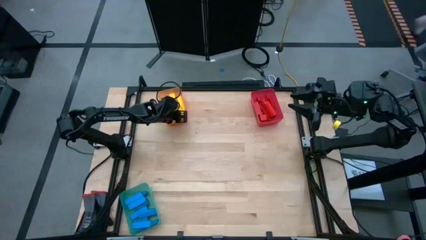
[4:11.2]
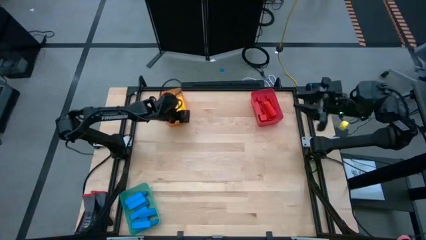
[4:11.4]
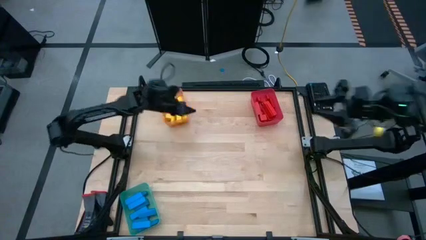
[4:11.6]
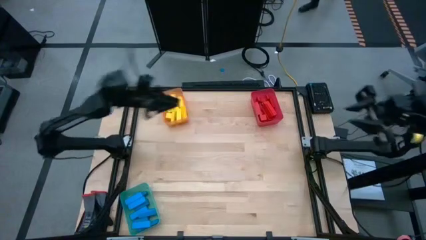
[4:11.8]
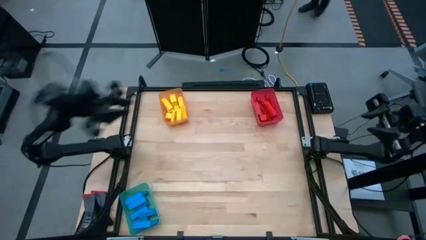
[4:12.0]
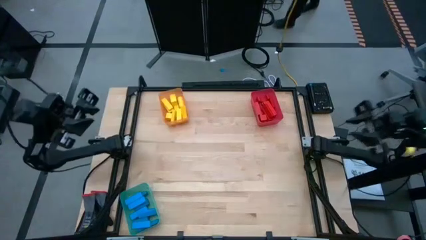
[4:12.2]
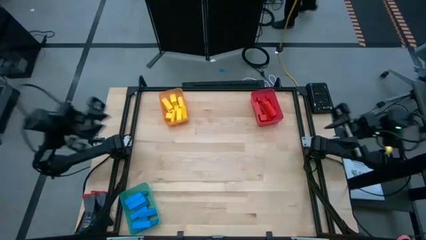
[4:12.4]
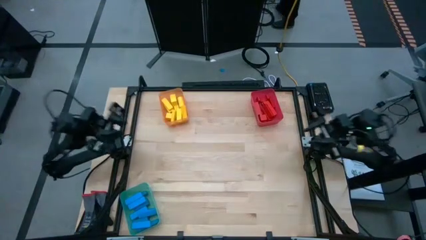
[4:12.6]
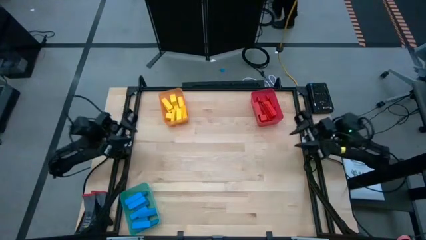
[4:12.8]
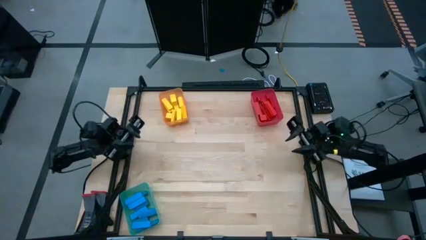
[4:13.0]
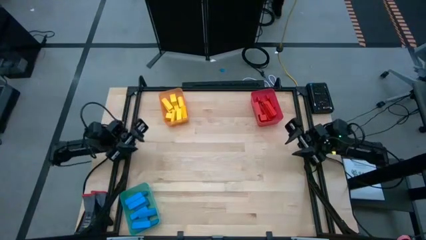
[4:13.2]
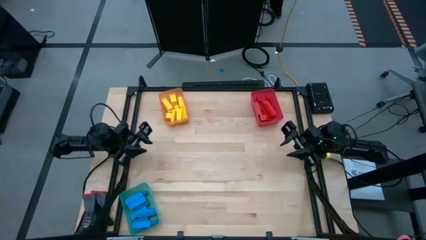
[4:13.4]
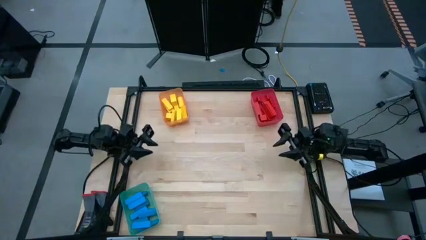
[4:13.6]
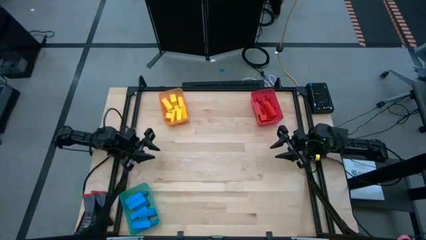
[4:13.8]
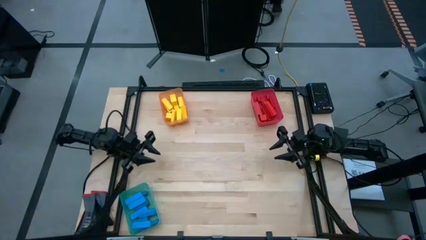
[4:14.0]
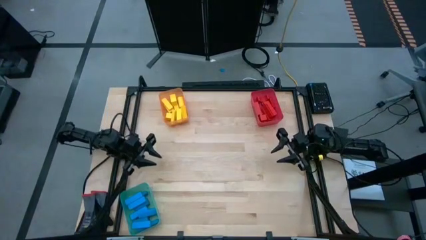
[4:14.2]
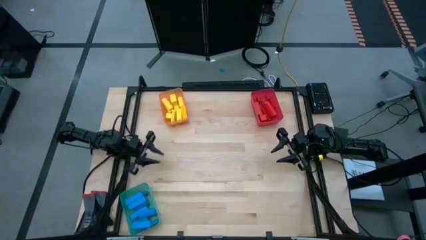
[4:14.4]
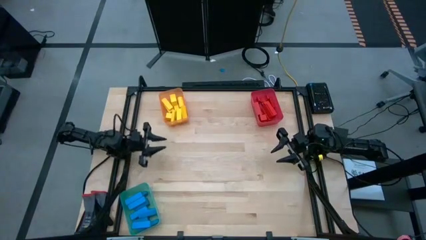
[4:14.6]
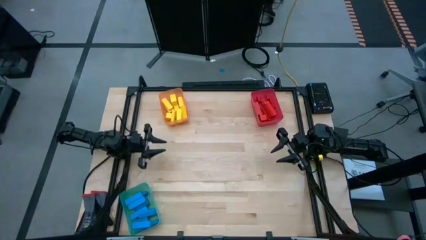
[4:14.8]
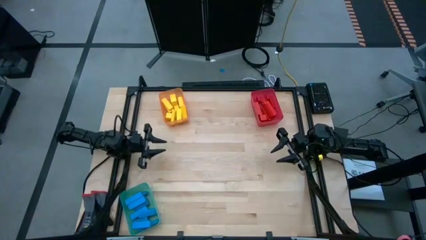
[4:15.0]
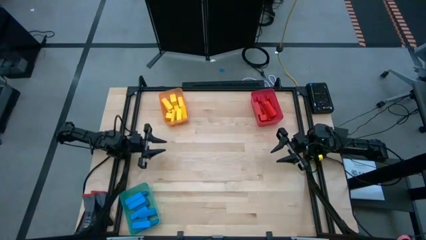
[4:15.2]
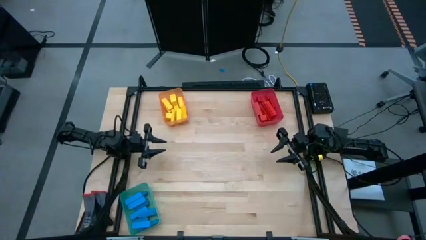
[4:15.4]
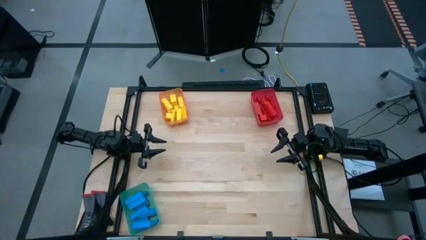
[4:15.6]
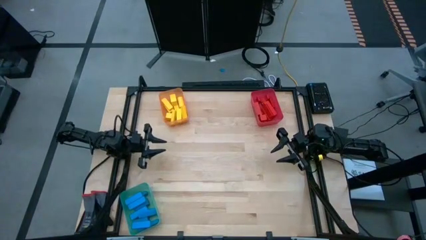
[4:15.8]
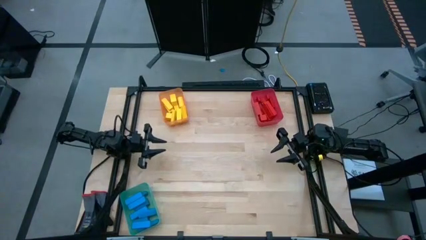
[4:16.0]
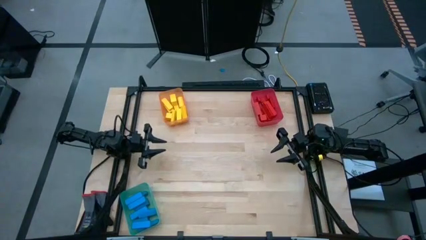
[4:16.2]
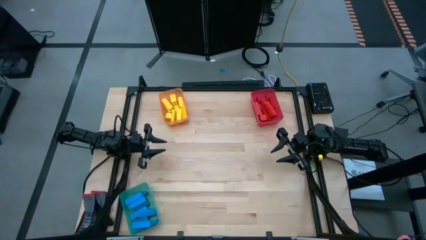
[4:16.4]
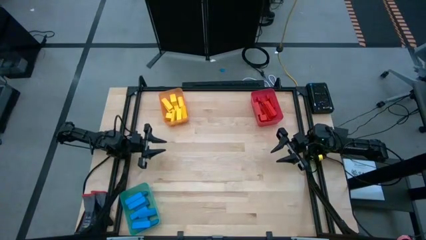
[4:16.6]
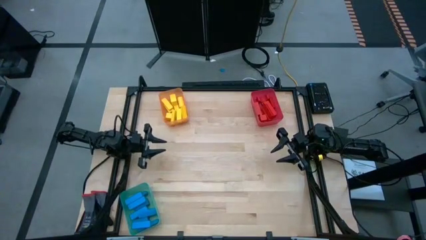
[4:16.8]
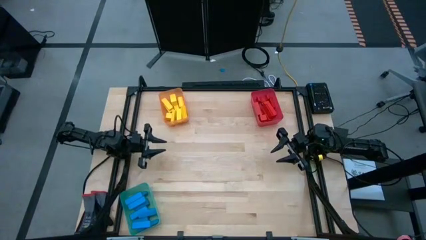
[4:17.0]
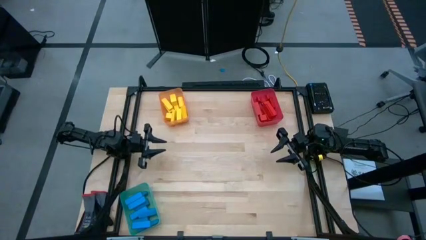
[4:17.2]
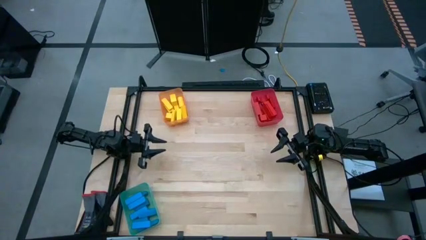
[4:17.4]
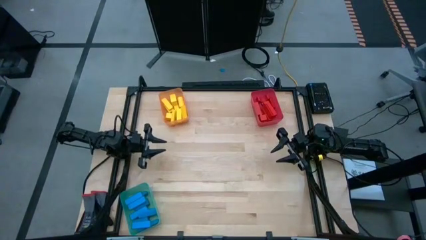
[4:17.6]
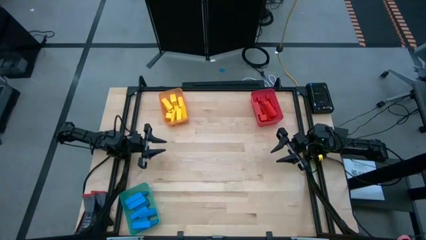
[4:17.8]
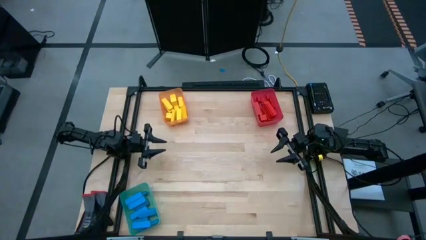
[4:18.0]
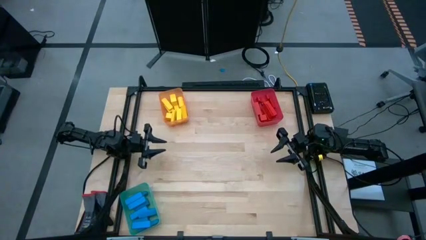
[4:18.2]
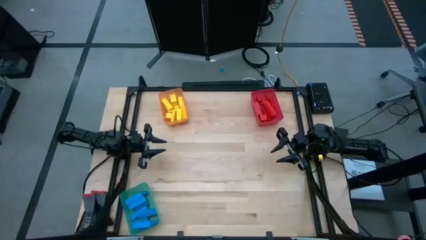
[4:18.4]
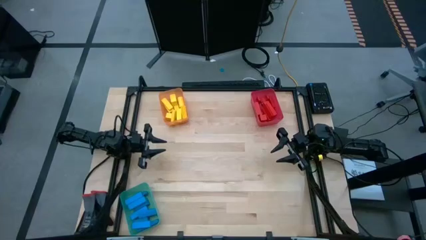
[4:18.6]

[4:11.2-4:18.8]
Task: Sort blocks
Return to Home Position
